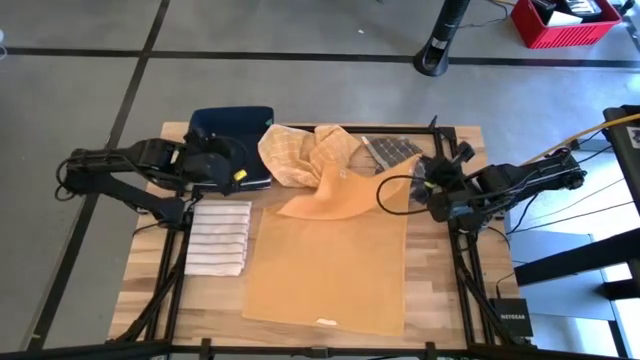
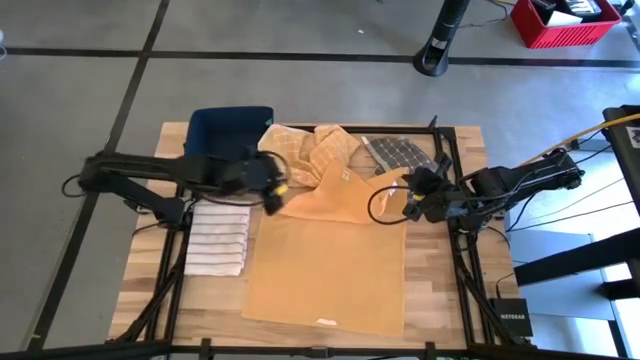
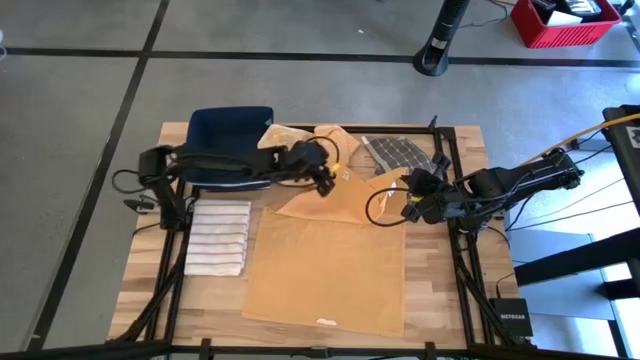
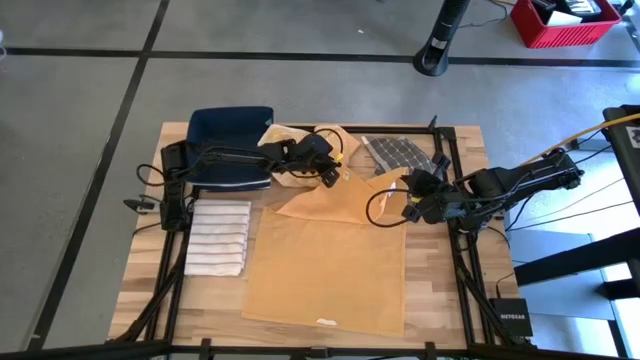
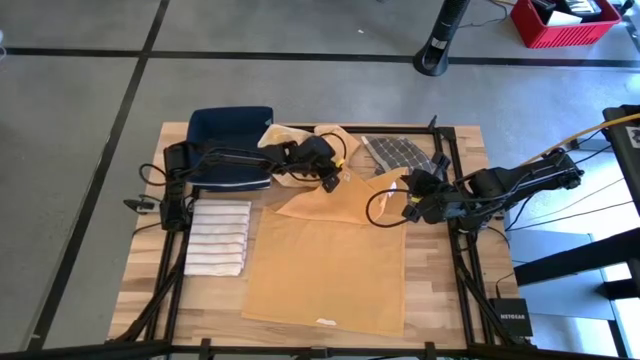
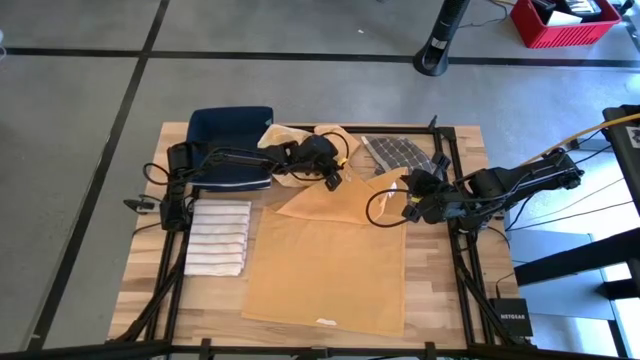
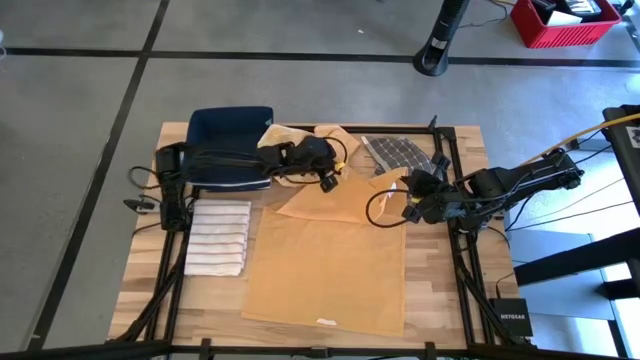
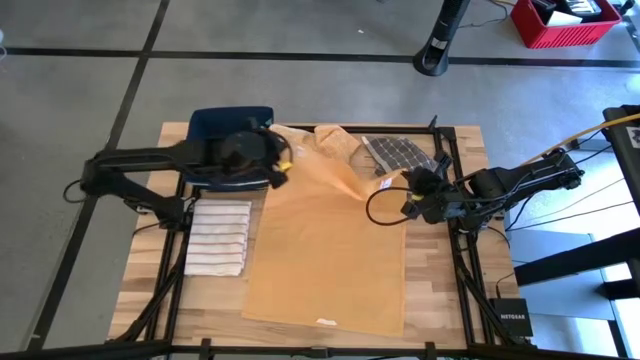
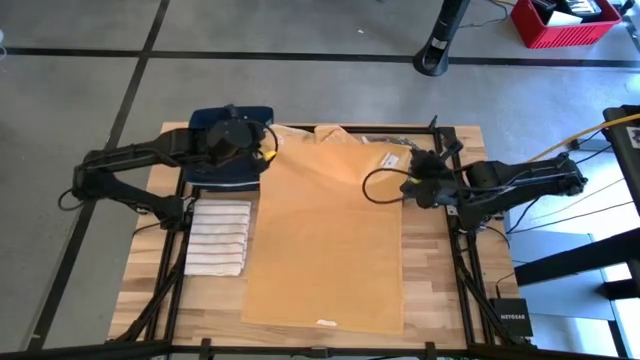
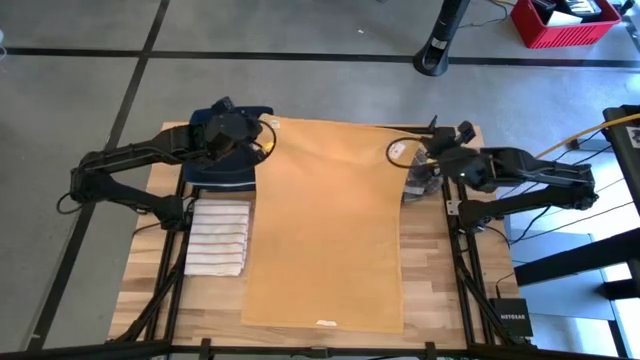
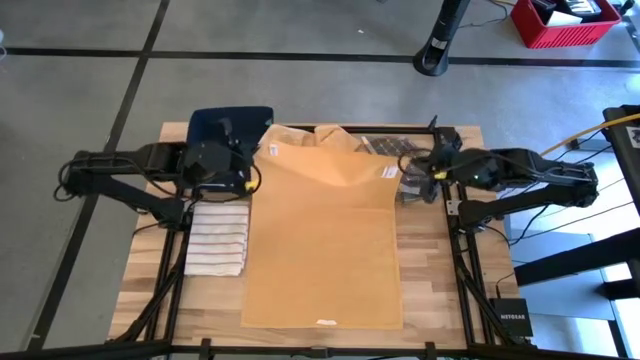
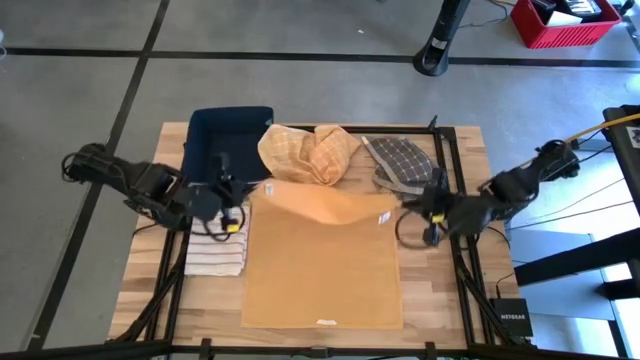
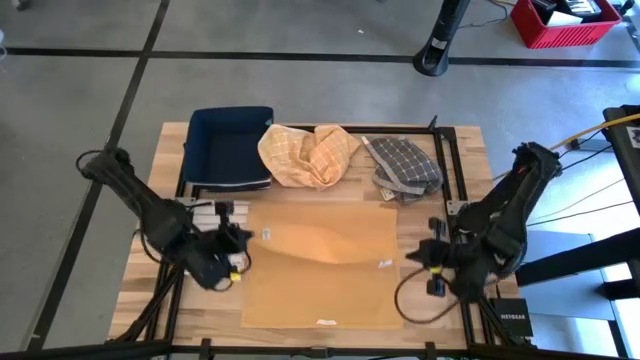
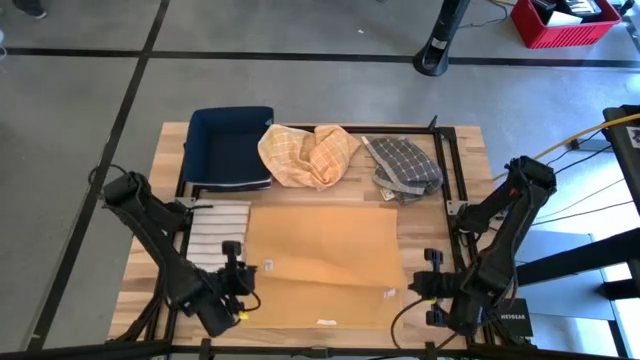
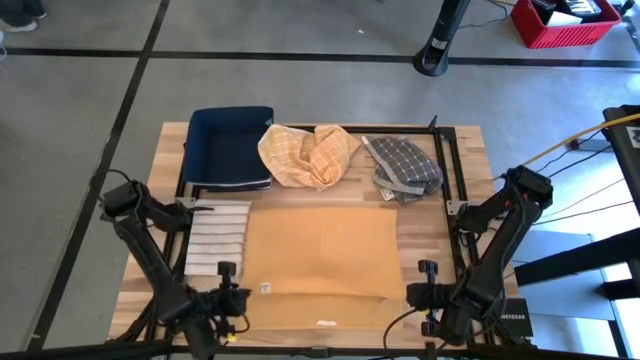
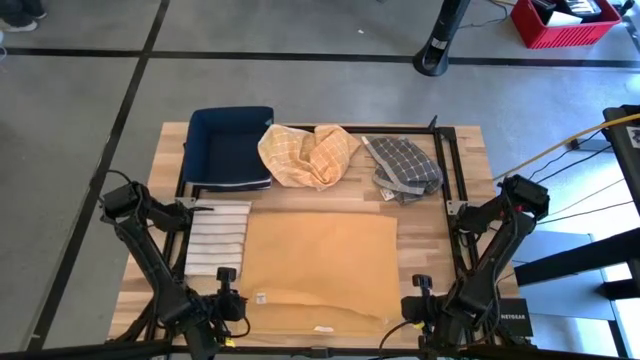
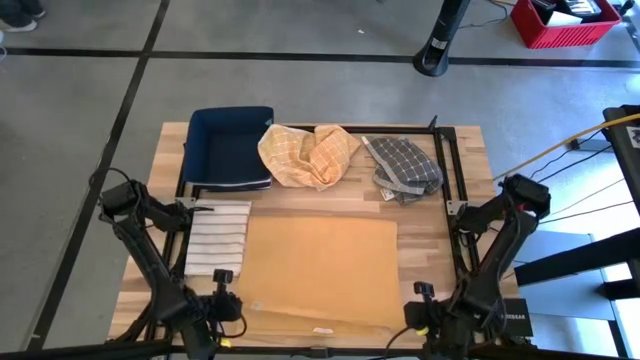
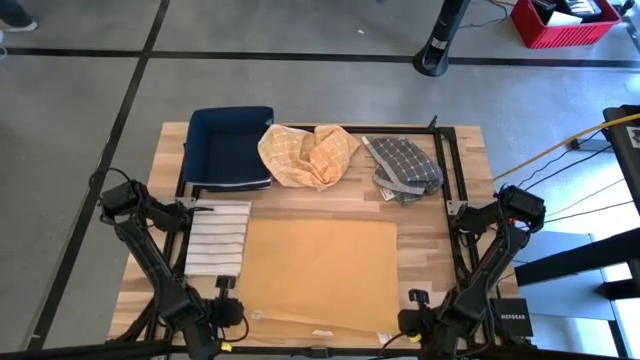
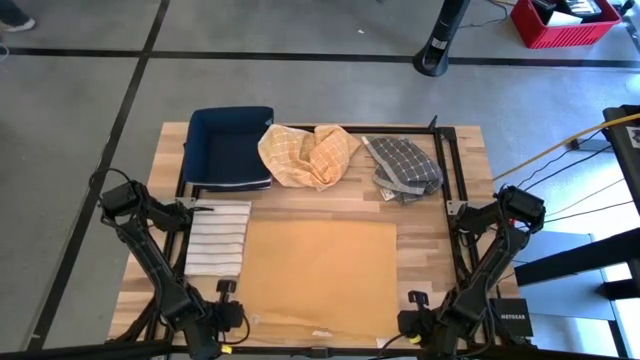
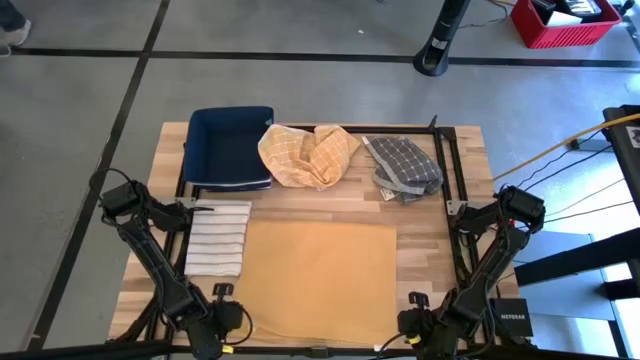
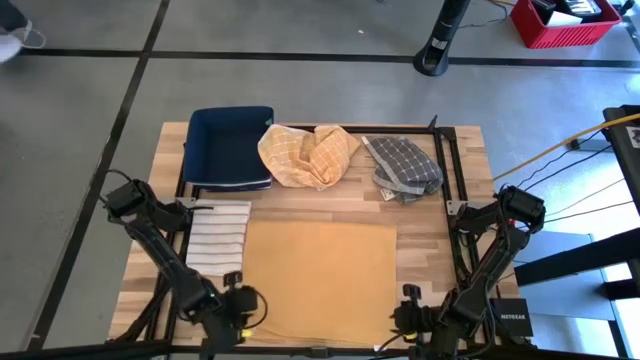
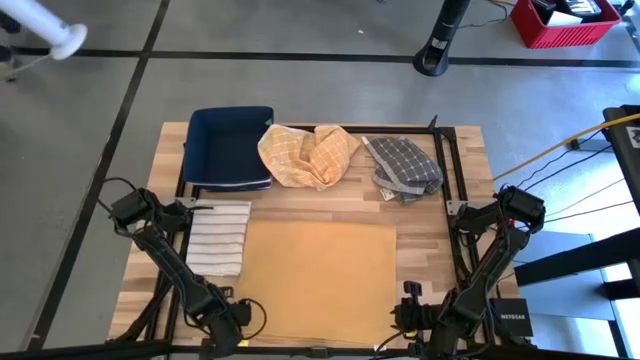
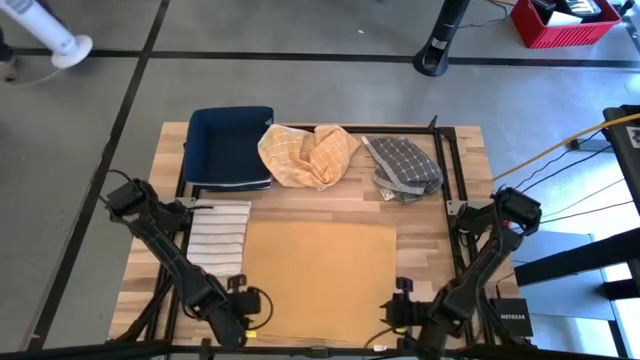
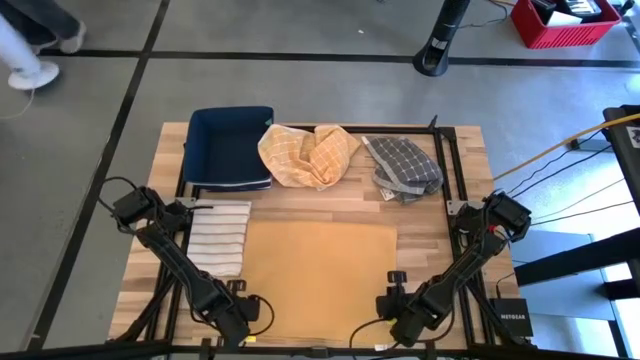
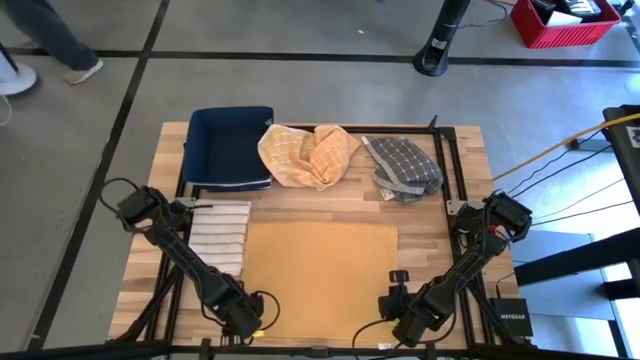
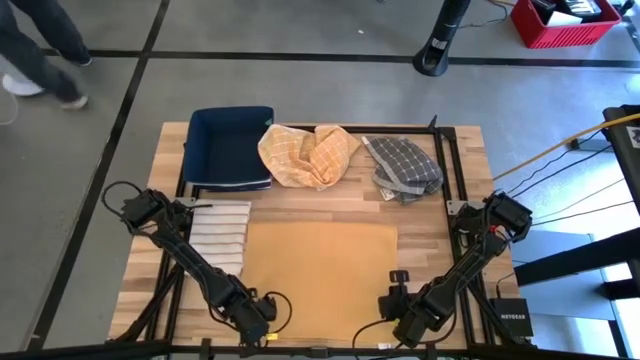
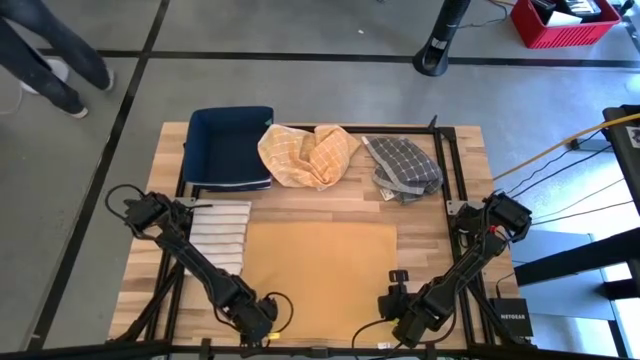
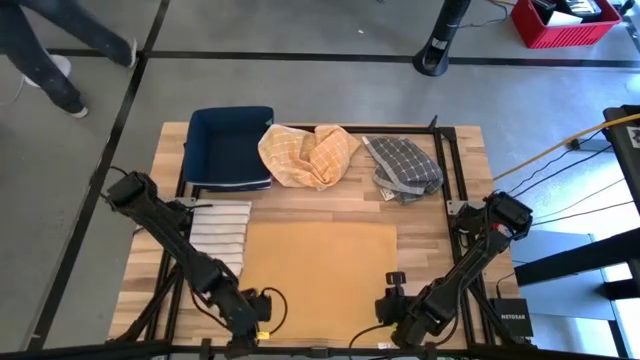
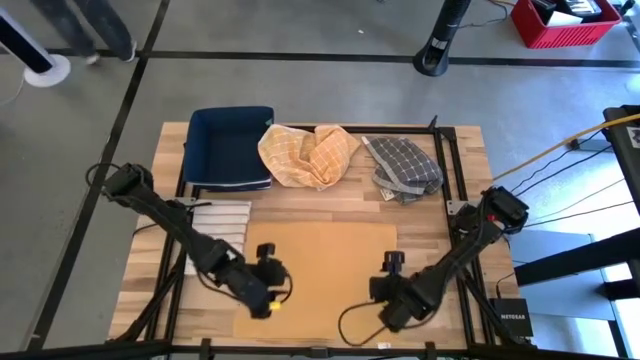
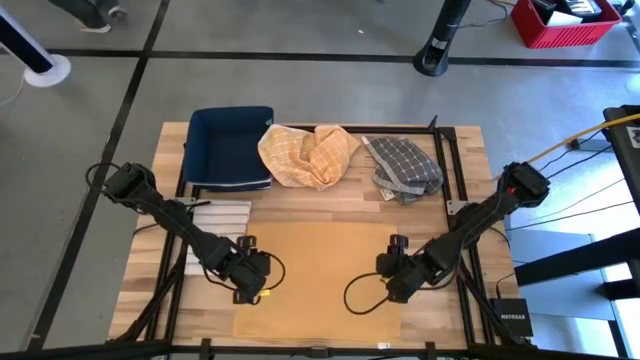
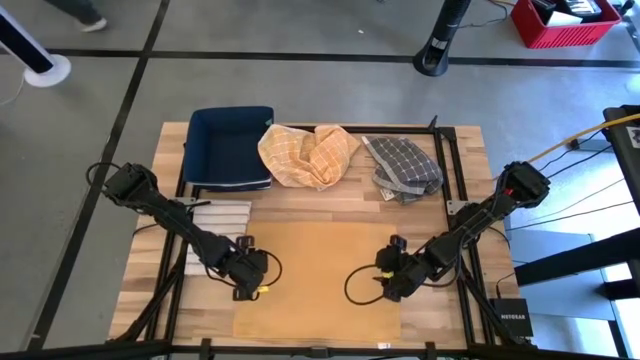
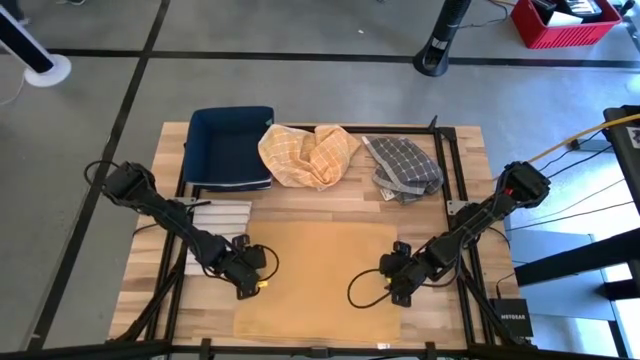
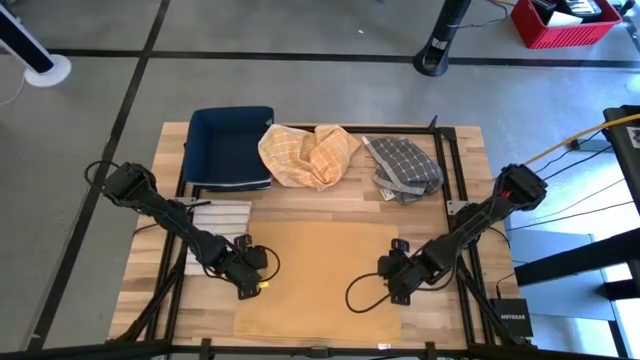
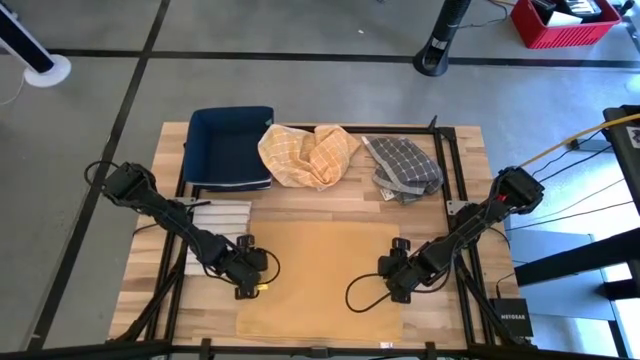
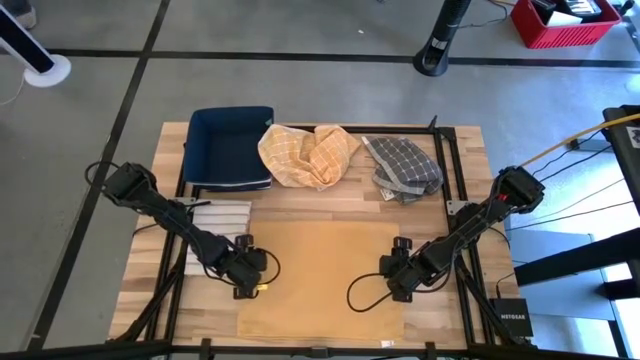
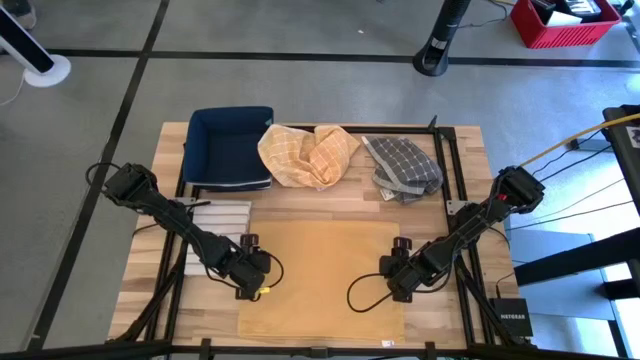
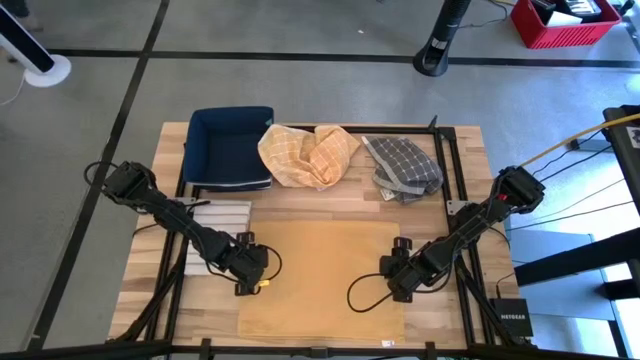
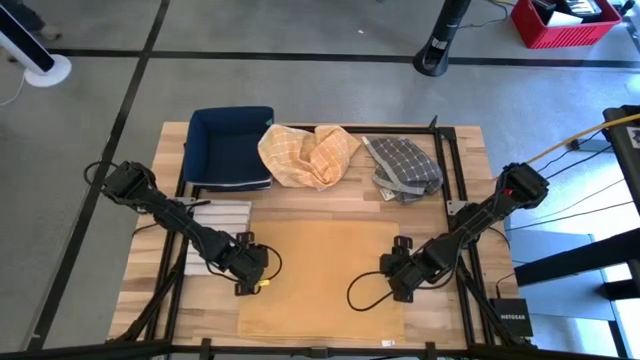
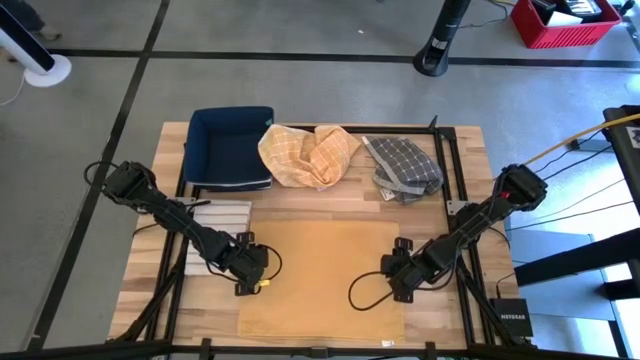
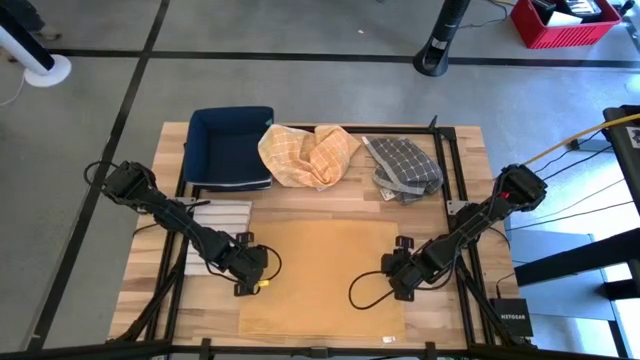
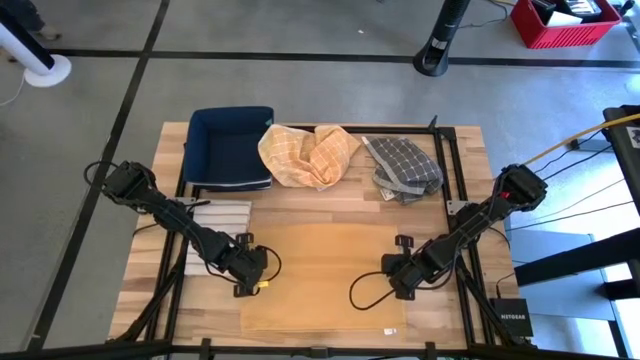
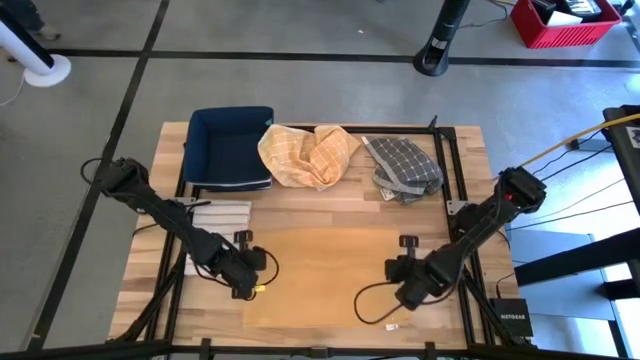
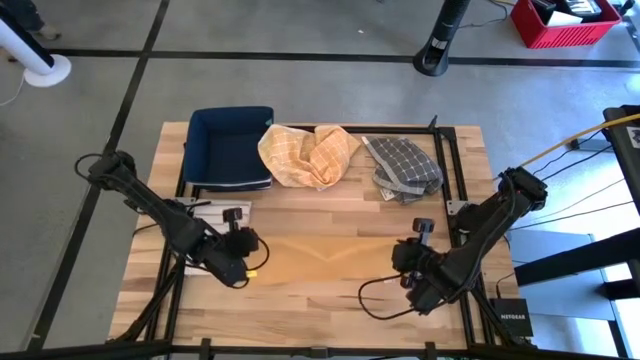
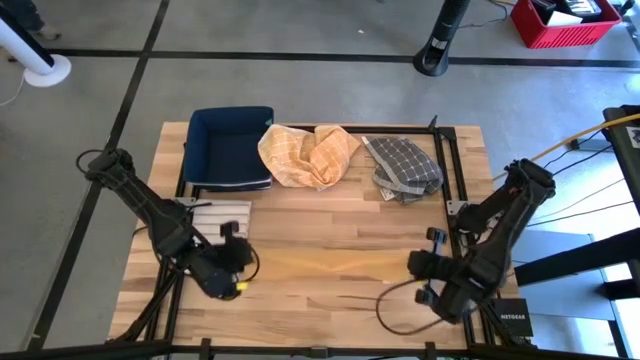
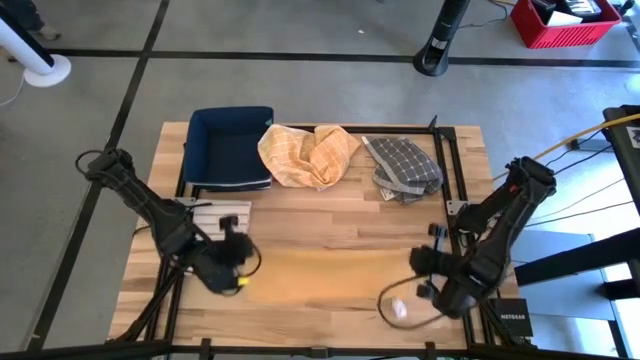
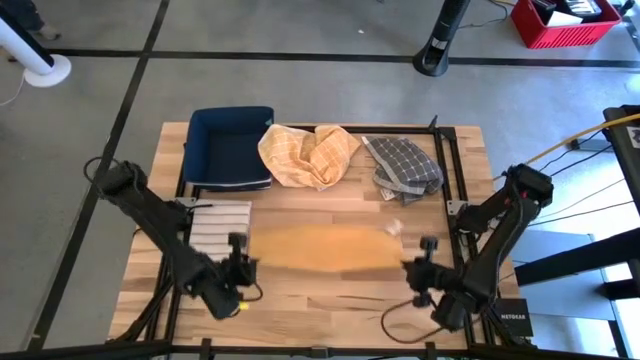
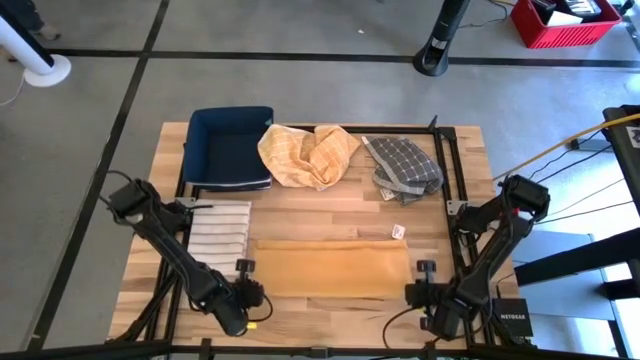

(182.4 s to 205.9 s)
Task: Fold towel
Fold the orange towel
